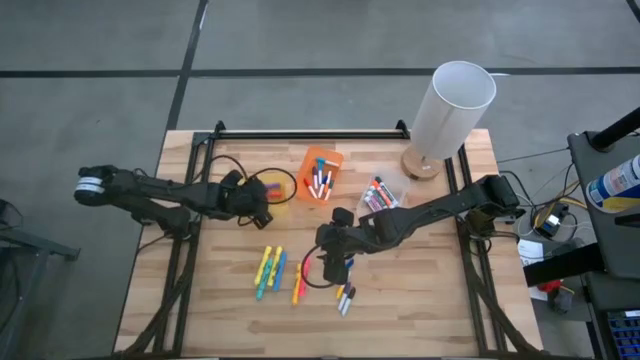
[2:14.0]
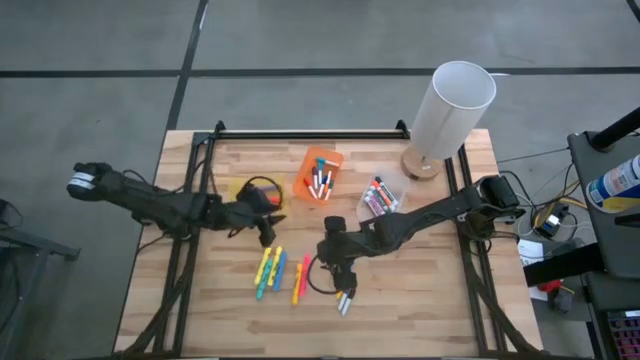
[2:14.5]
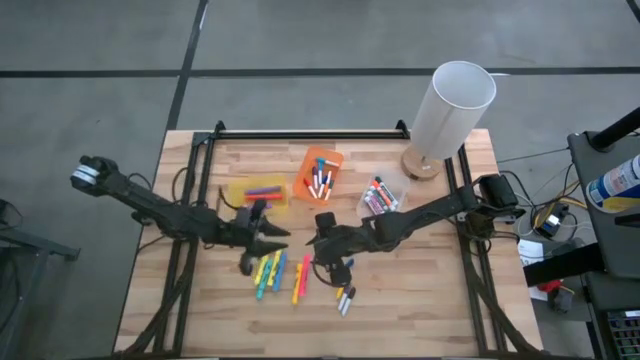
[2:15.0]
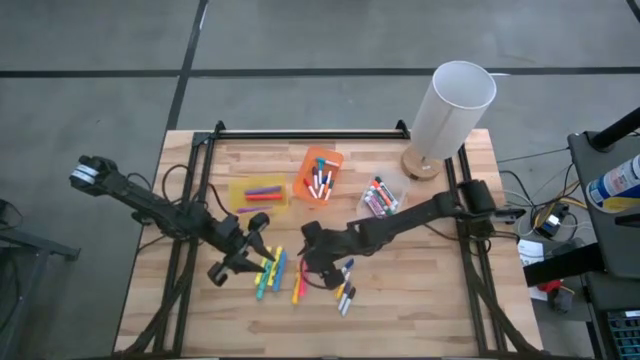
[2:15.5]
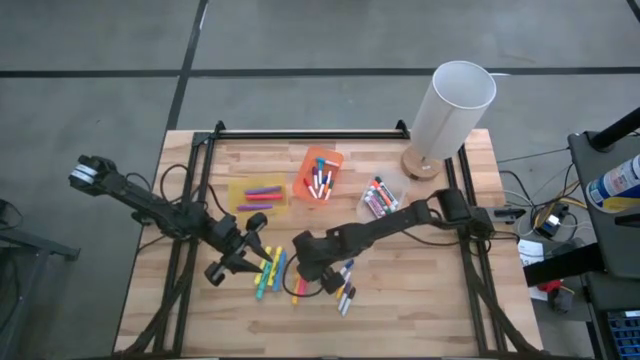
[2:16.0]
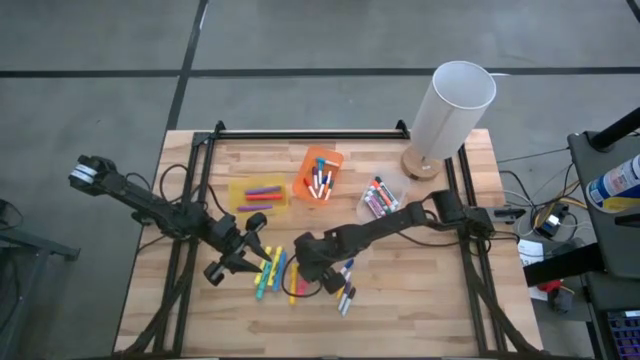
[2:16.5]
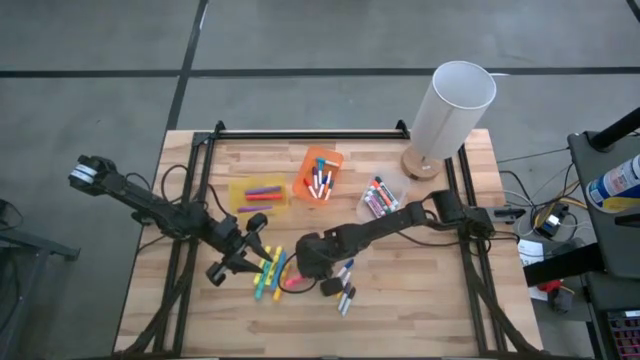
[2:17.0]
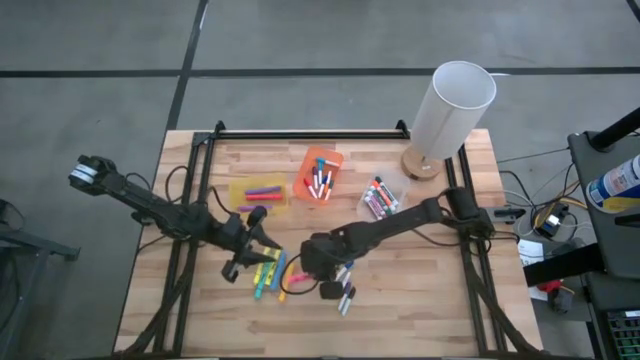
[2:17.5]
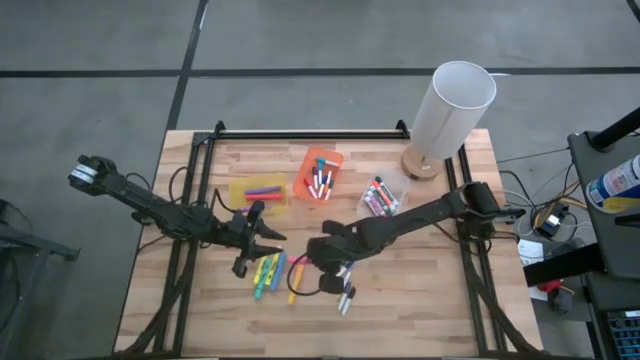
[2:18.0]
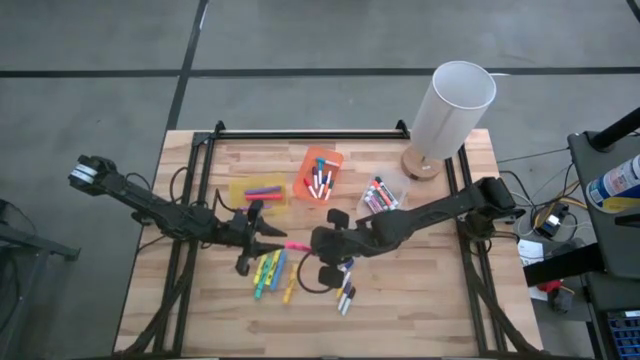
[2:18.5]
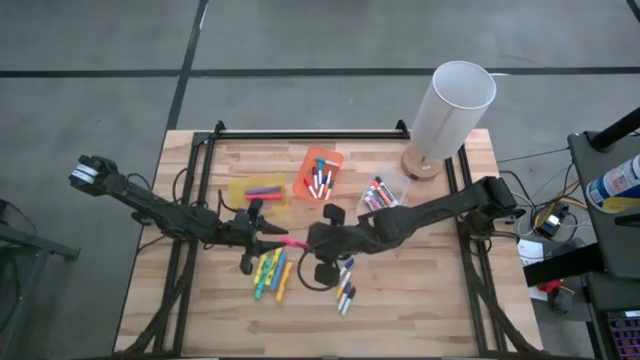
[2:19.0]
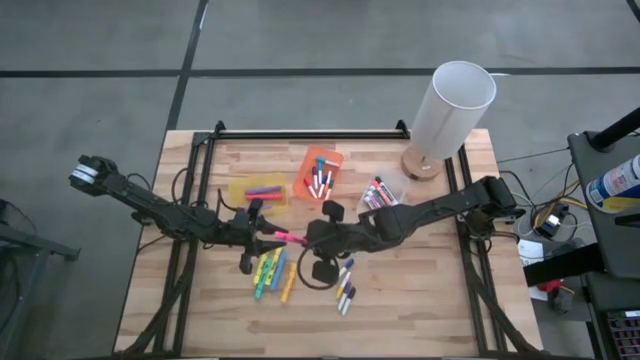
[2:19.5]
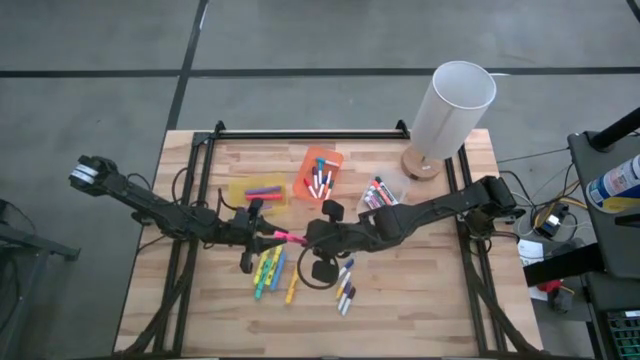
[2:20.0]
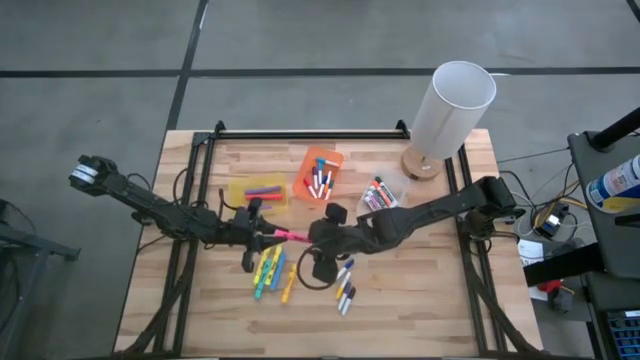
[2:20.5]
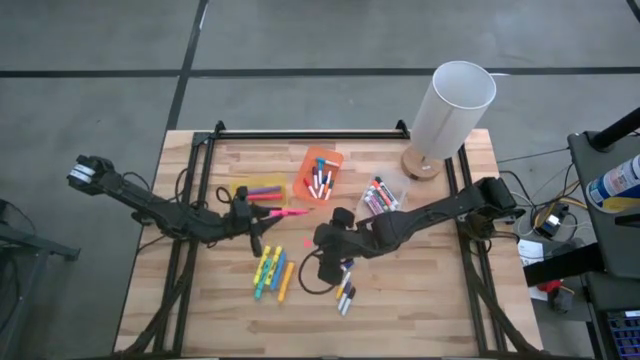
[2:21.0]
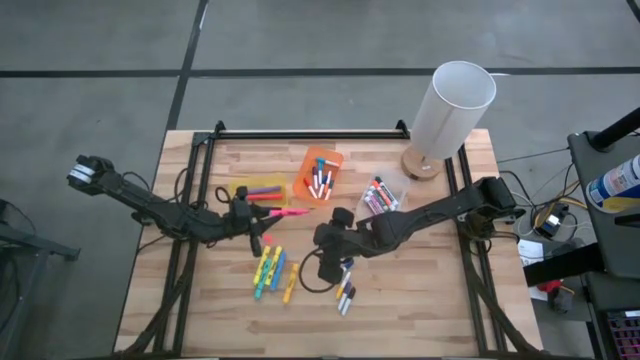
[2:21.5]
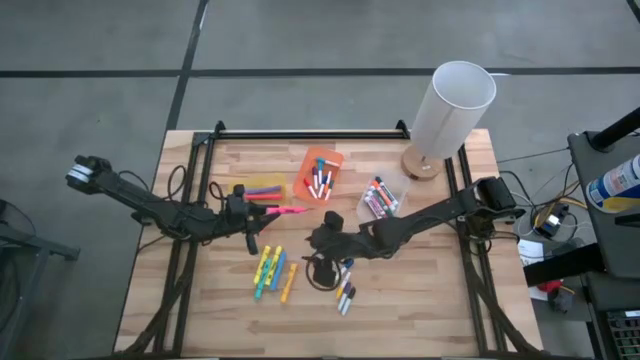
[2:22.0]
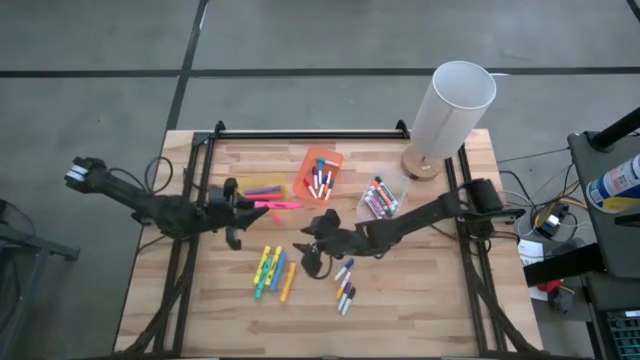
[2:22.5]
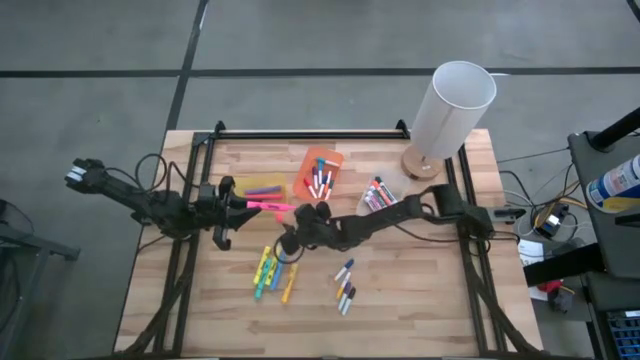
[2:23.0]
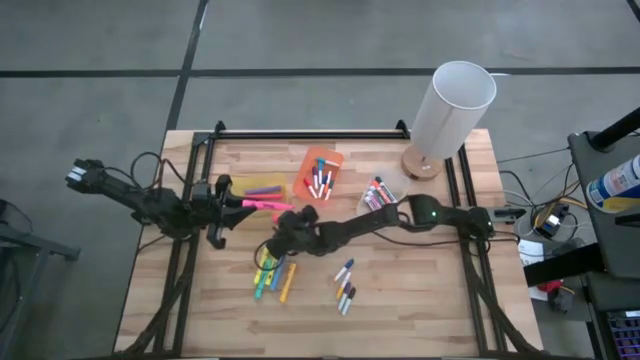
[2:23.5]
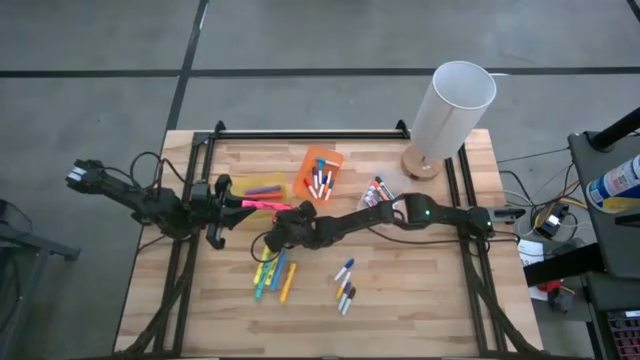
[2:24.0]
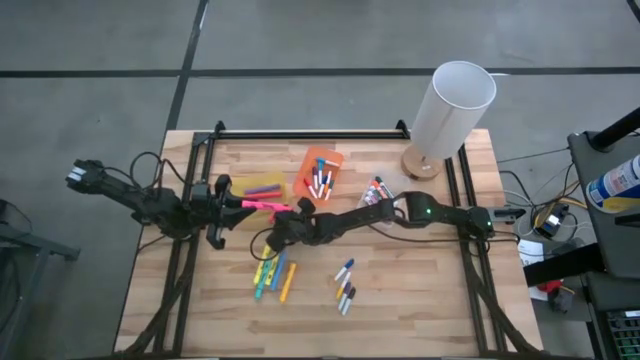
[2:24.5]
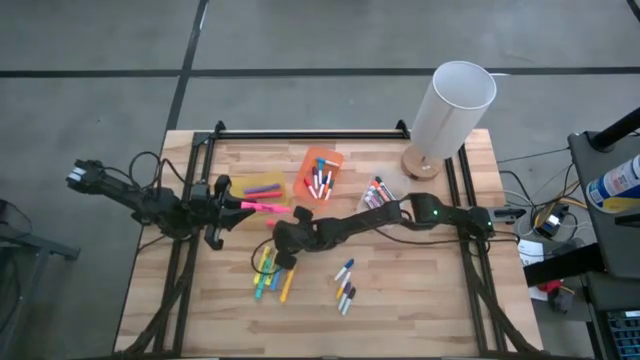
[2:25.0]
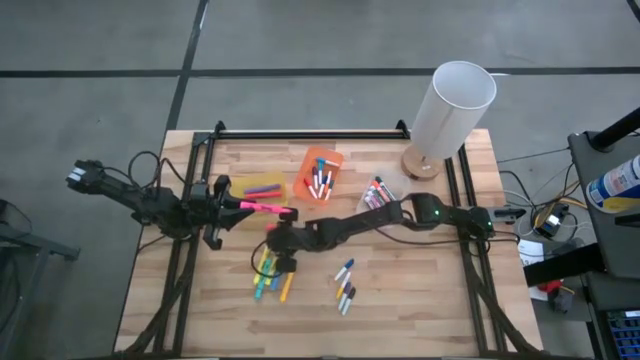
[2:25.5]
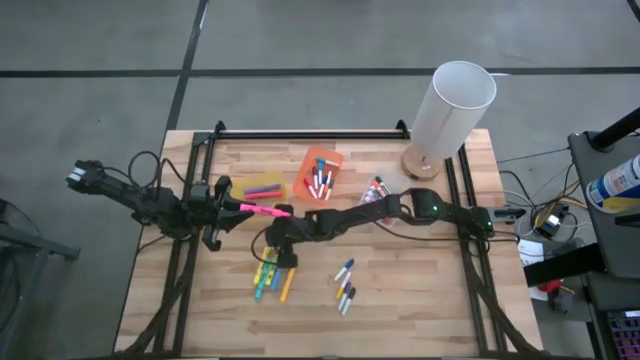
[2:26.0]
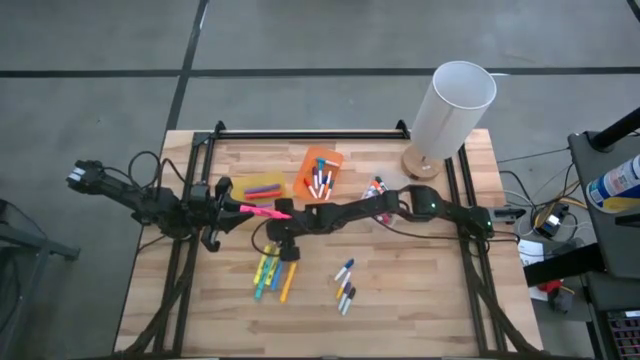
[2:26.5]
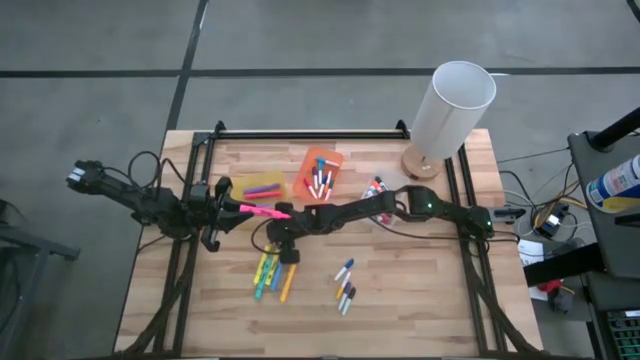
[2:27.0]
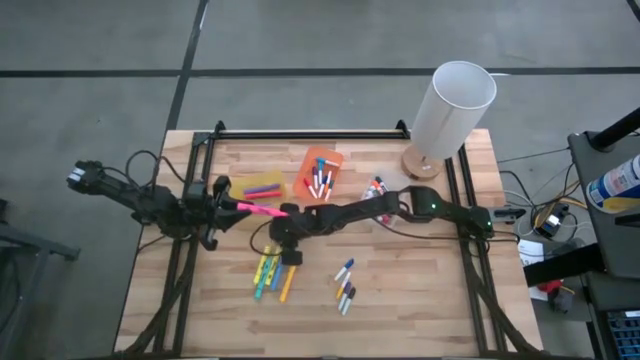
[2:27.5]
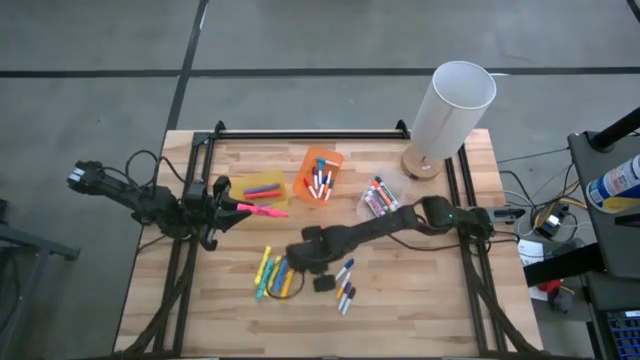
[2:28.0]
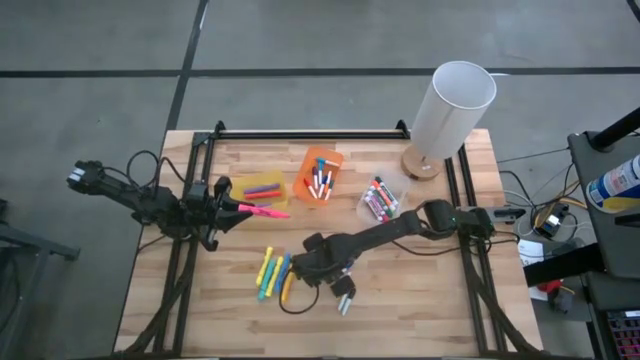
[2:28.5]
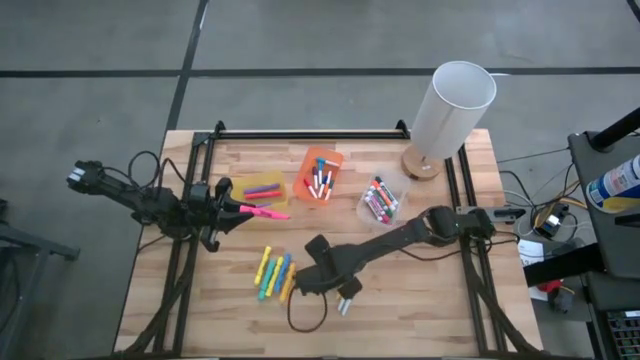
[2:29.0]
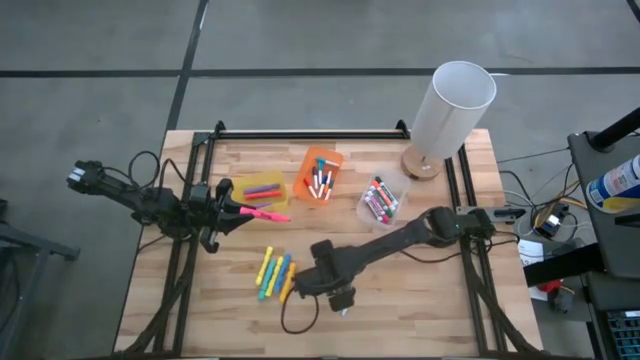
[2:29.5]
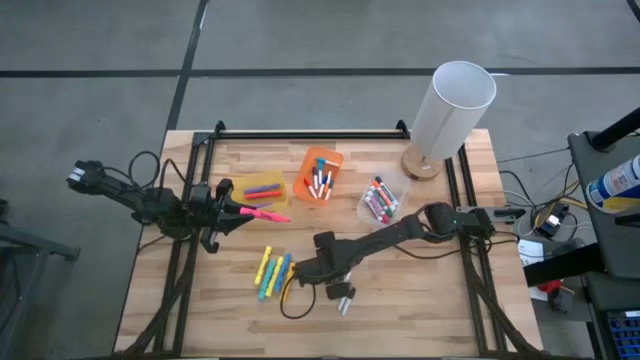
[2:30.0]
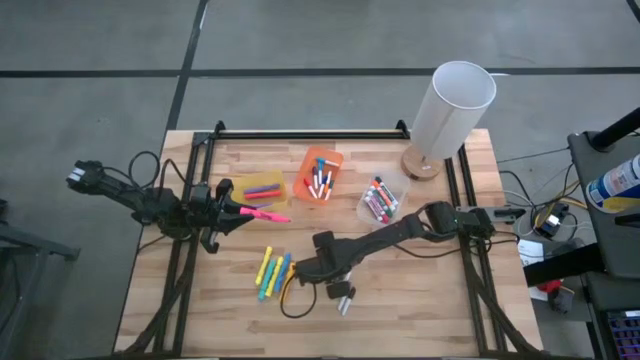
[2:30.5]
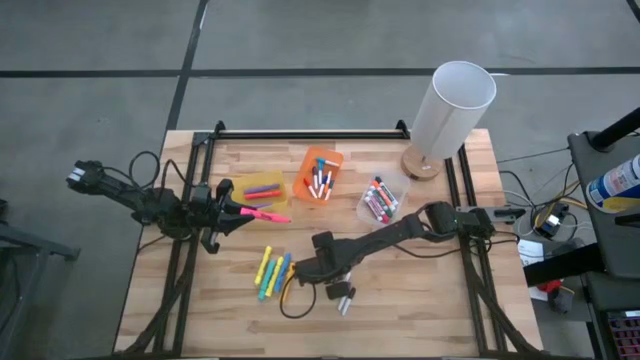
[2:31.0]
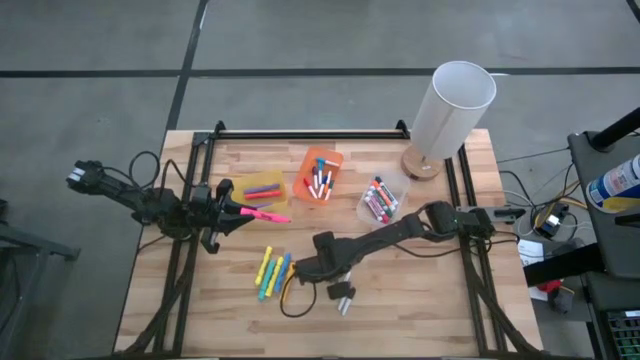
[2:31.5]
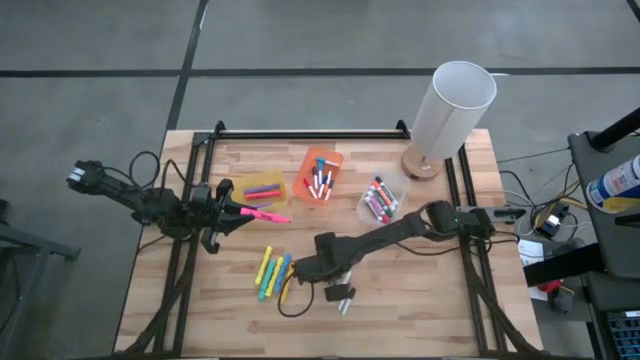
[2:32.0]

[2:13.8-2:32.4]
Task: Pick & Place Markers
Put the pink highlighter pen into the yellow bin

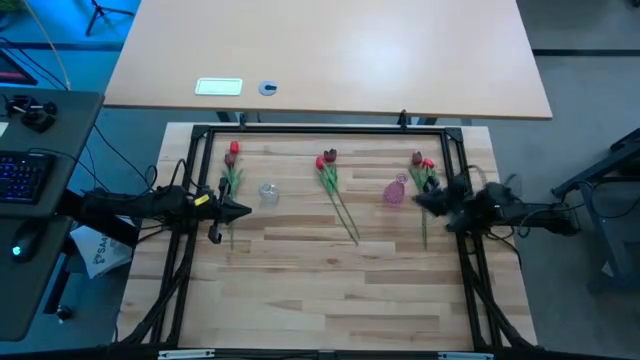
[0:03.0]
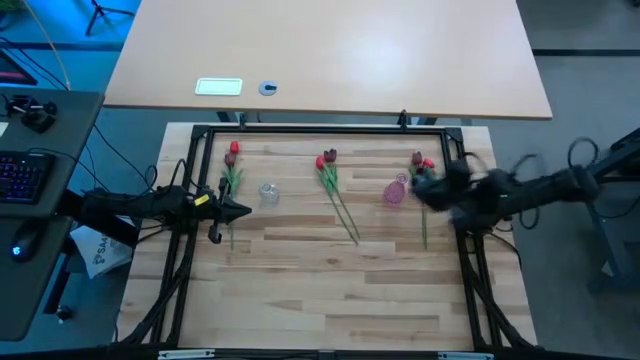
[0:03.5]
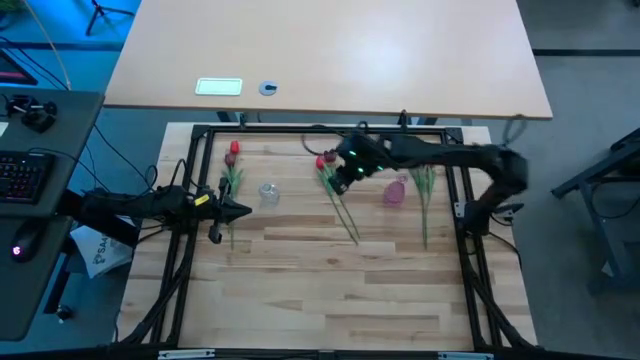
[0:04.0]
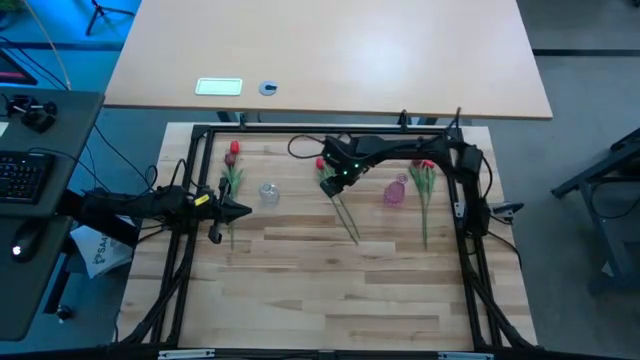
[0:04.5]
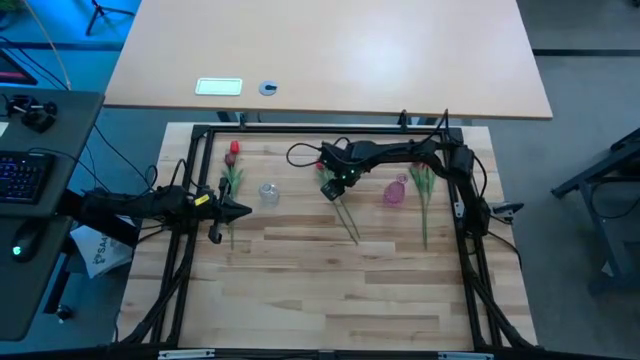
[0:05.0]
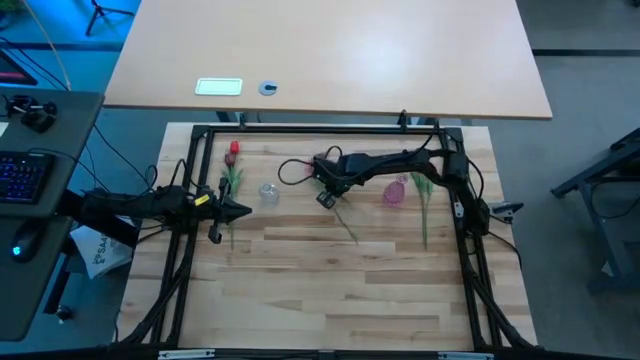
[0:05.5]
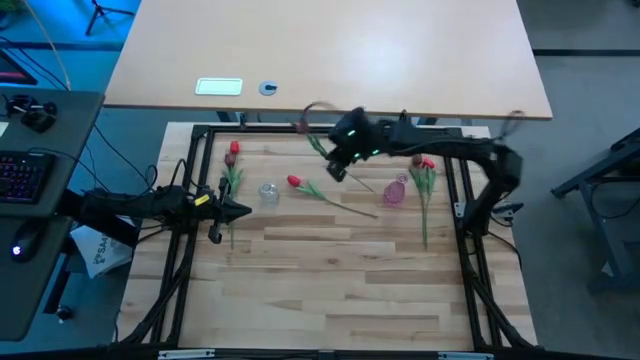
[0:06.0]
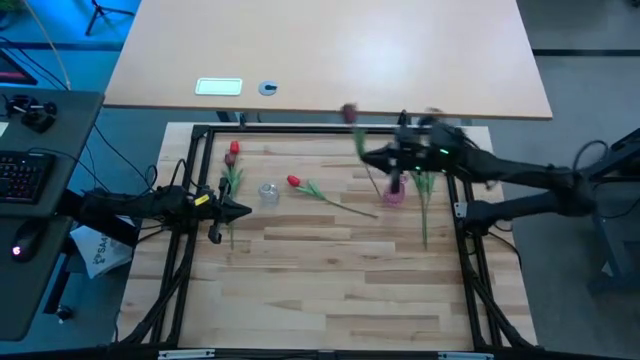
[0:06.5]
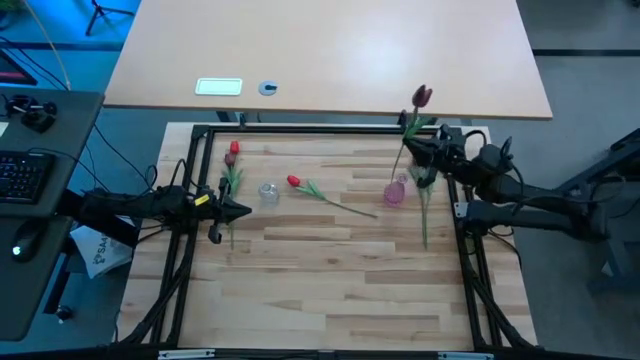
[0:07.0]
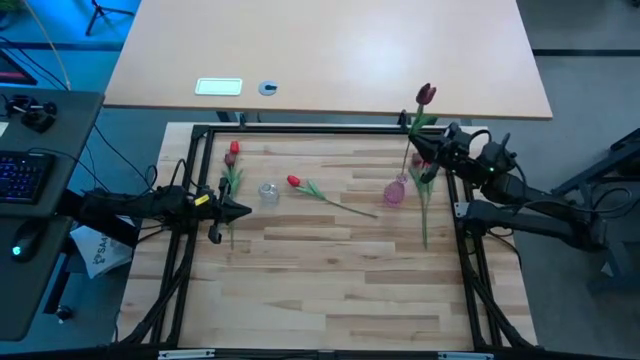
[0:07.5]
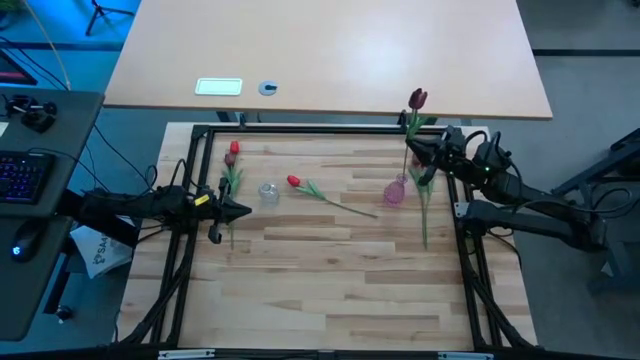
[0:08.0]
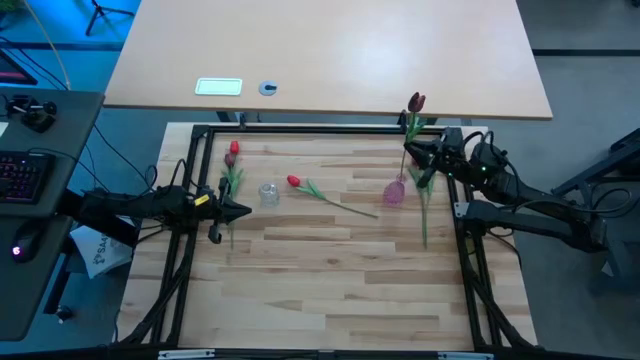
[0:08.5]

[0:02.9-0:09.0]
Task: Sort flowers into vase by color
Put the center dark red tulip into the purple vase
